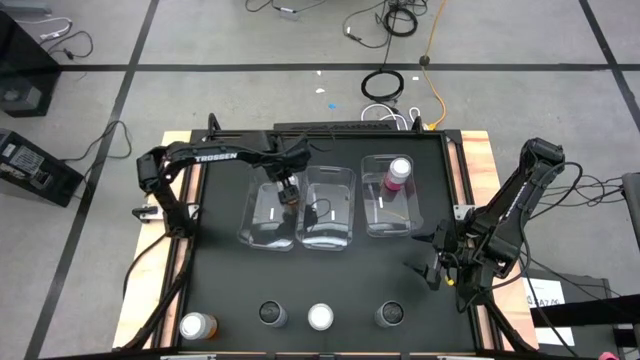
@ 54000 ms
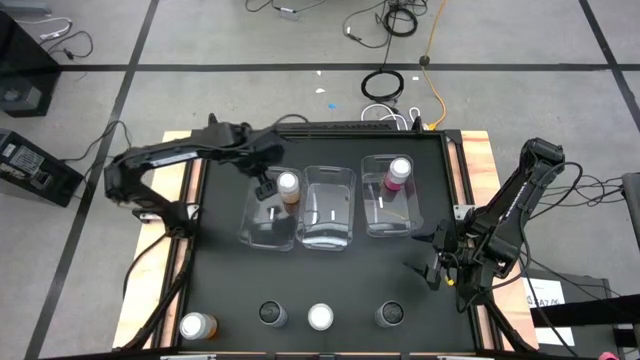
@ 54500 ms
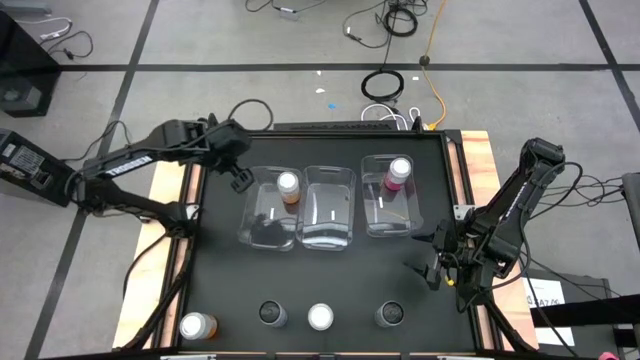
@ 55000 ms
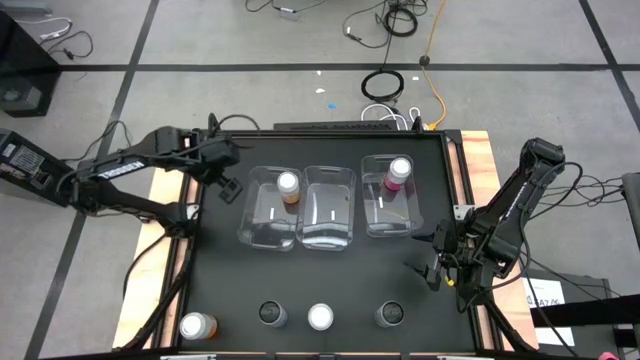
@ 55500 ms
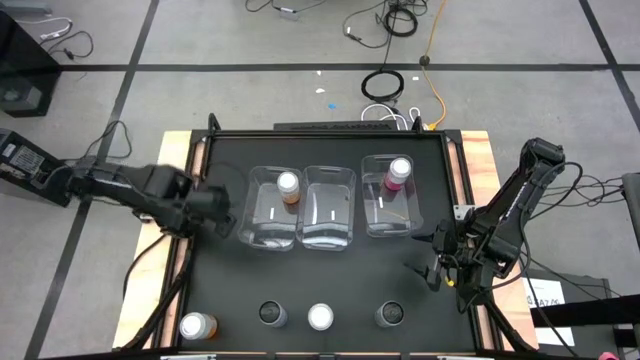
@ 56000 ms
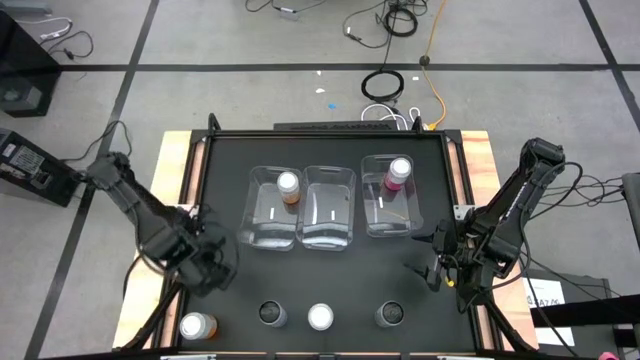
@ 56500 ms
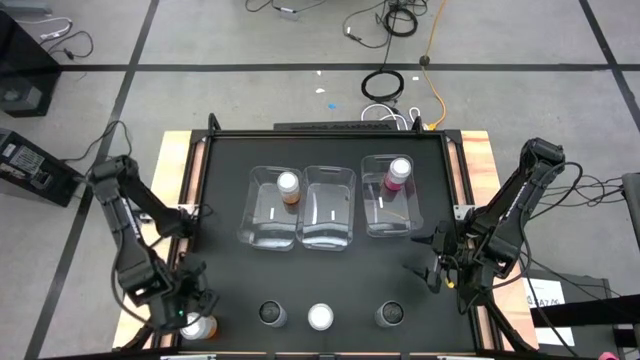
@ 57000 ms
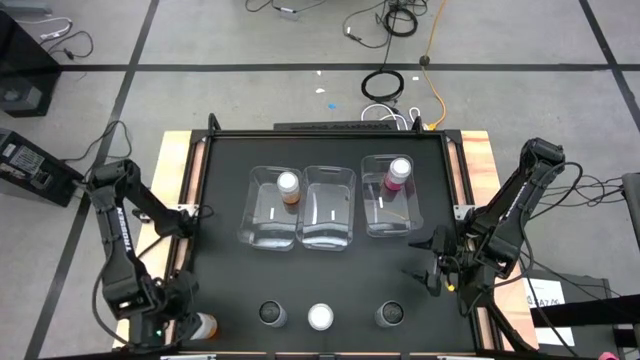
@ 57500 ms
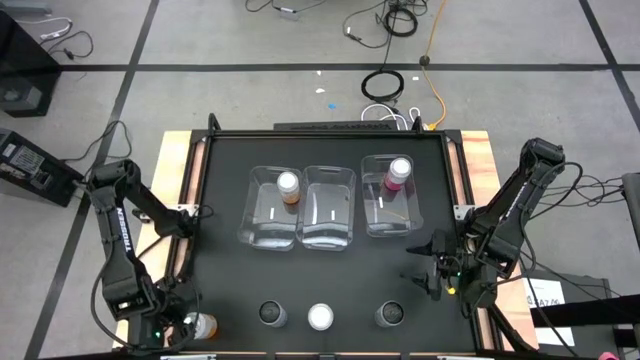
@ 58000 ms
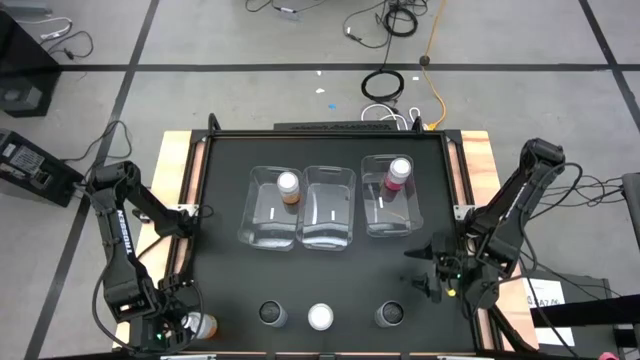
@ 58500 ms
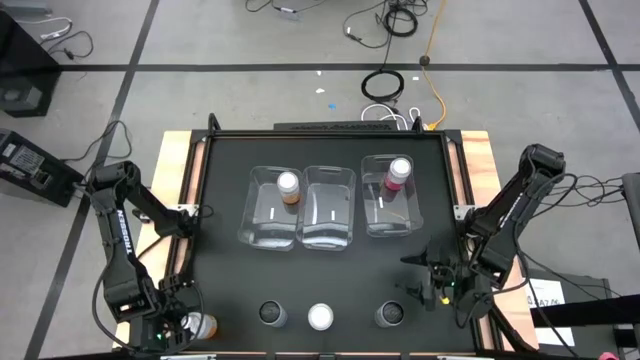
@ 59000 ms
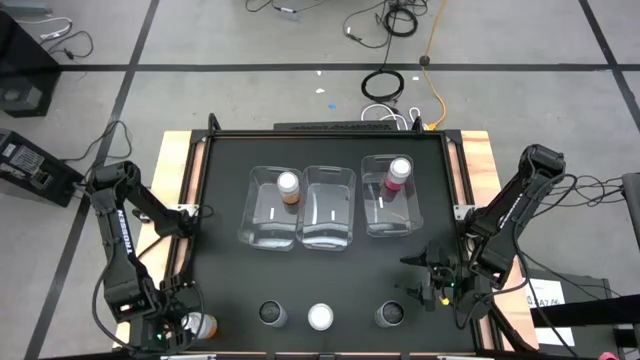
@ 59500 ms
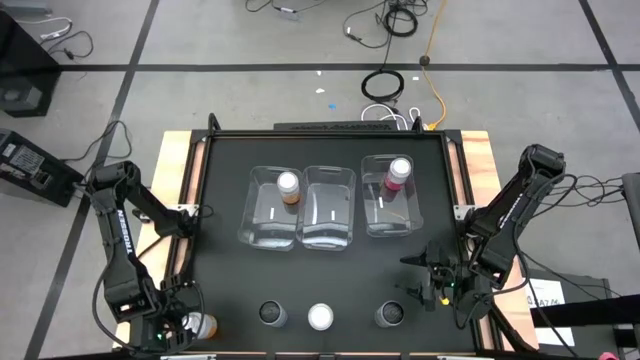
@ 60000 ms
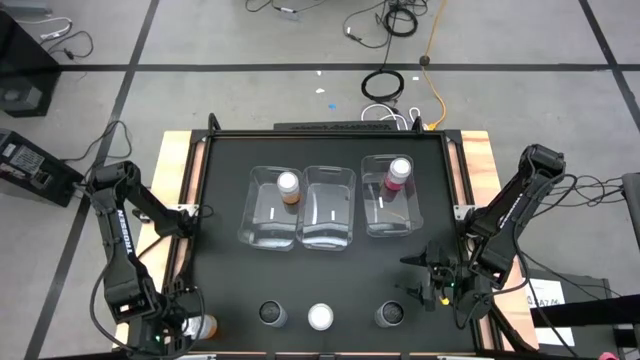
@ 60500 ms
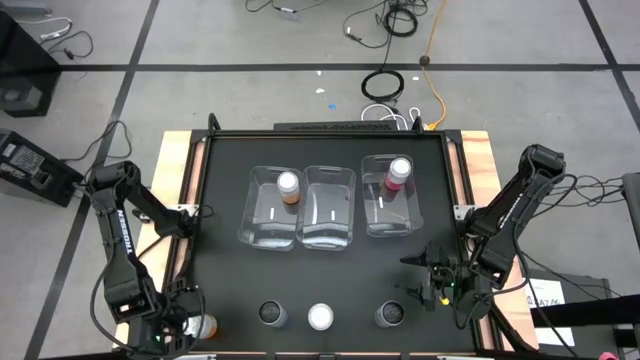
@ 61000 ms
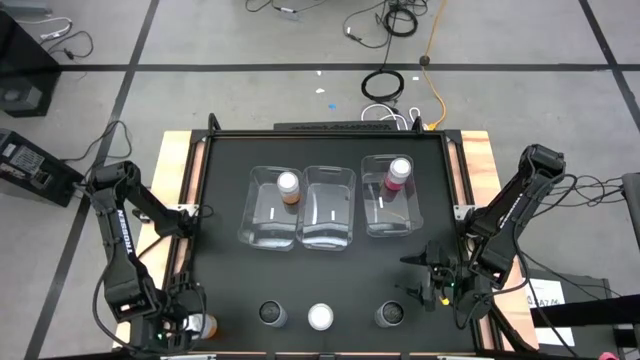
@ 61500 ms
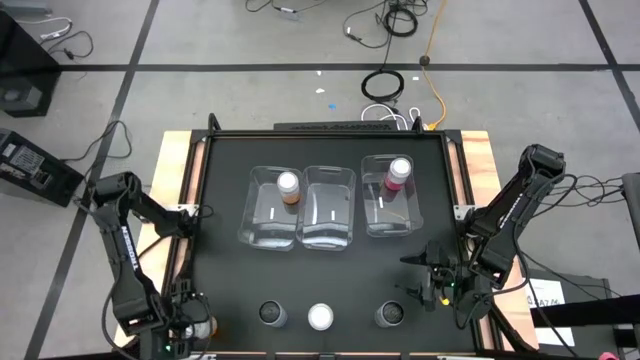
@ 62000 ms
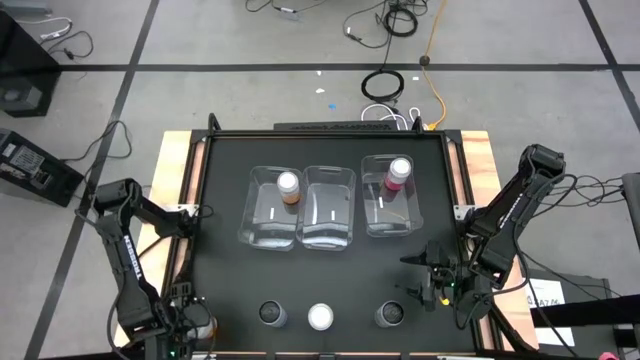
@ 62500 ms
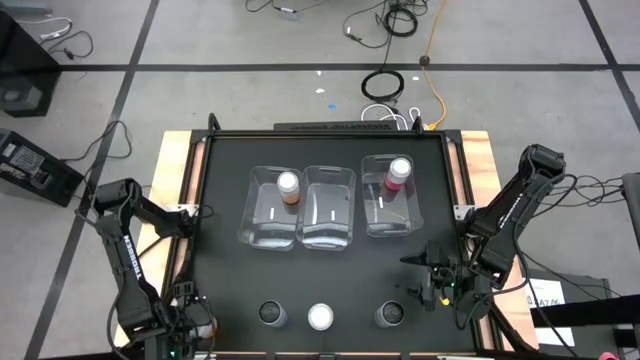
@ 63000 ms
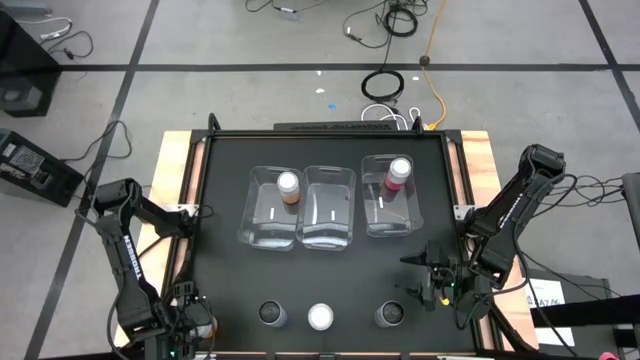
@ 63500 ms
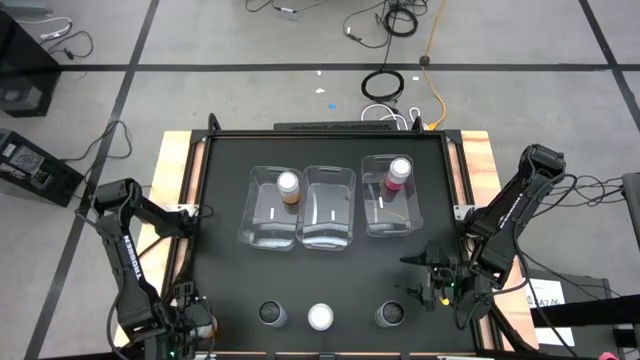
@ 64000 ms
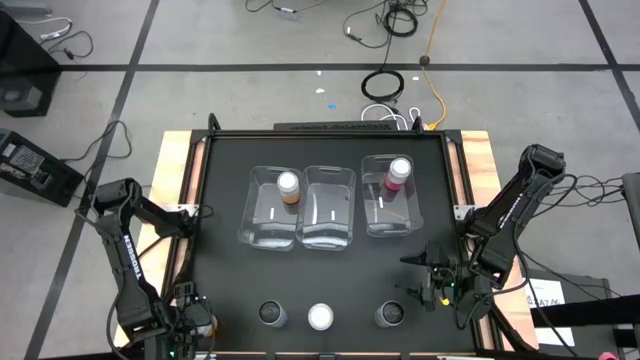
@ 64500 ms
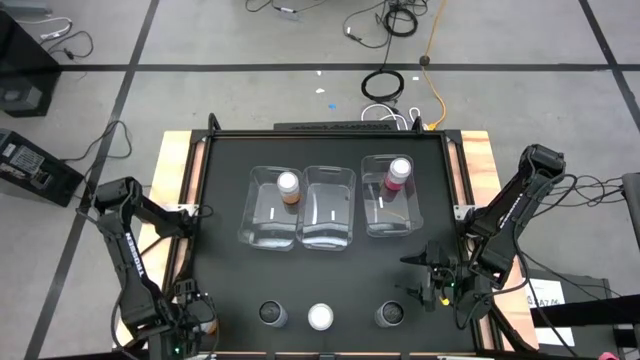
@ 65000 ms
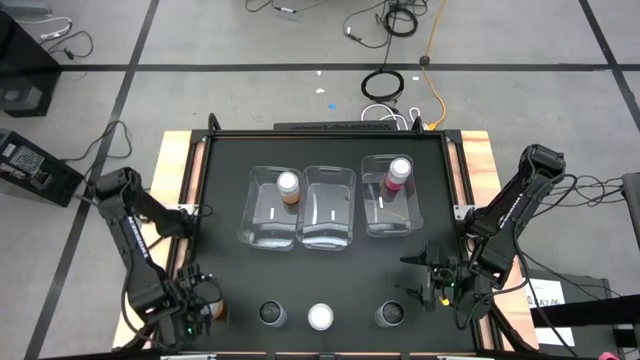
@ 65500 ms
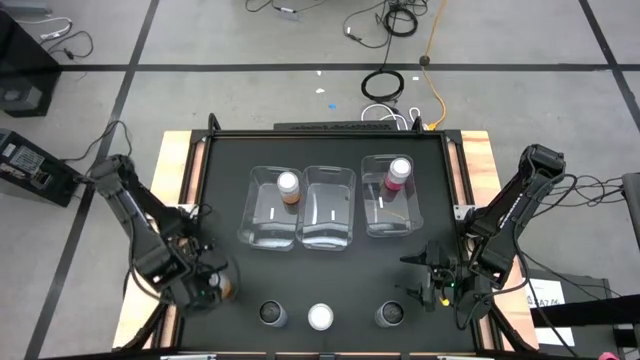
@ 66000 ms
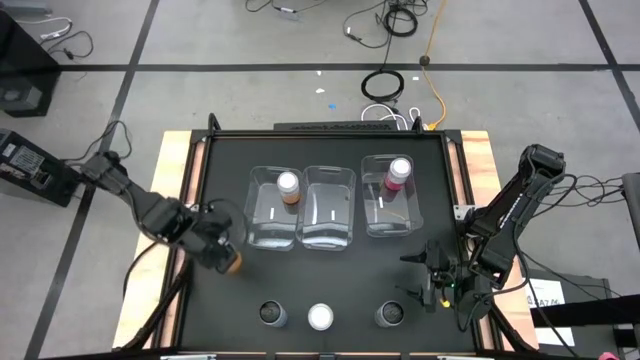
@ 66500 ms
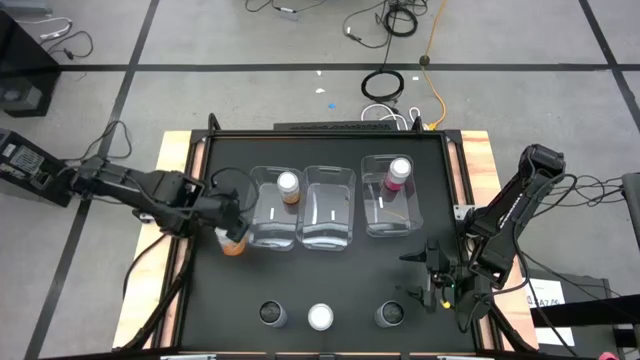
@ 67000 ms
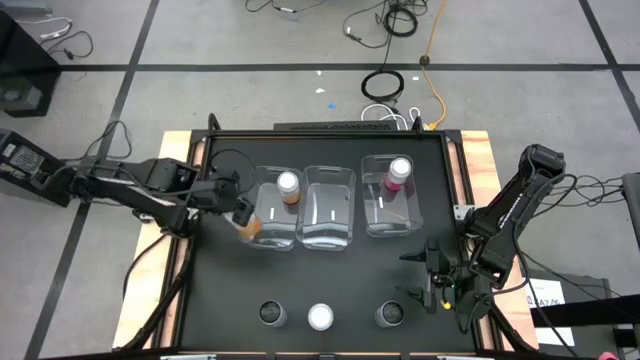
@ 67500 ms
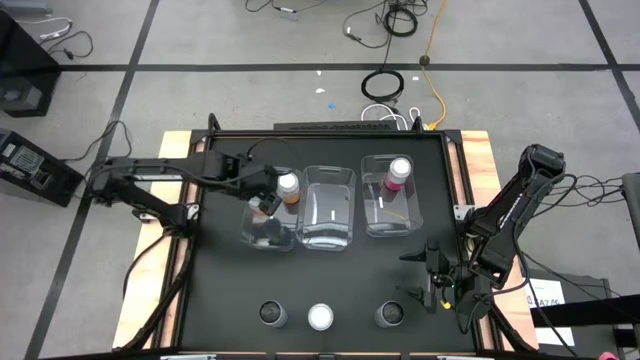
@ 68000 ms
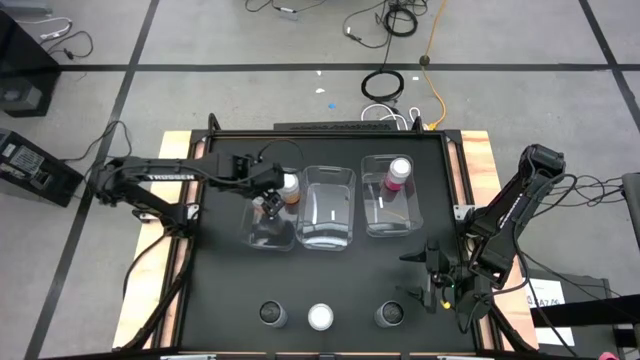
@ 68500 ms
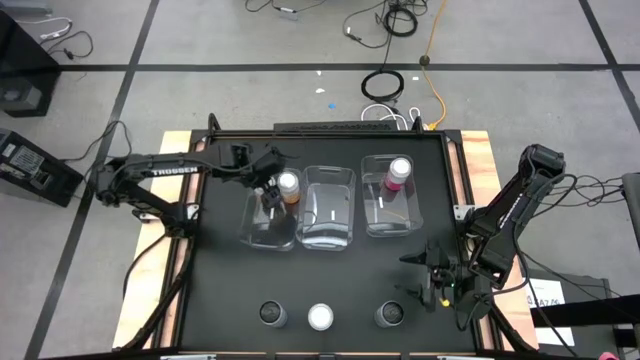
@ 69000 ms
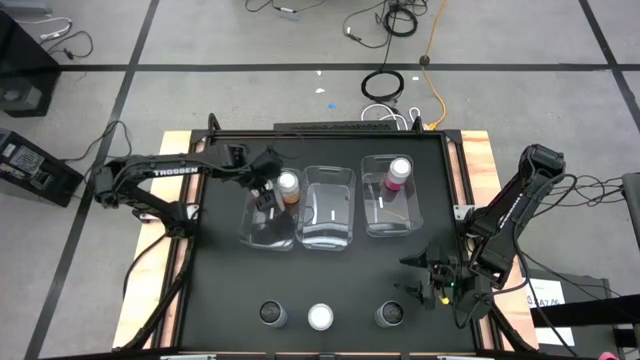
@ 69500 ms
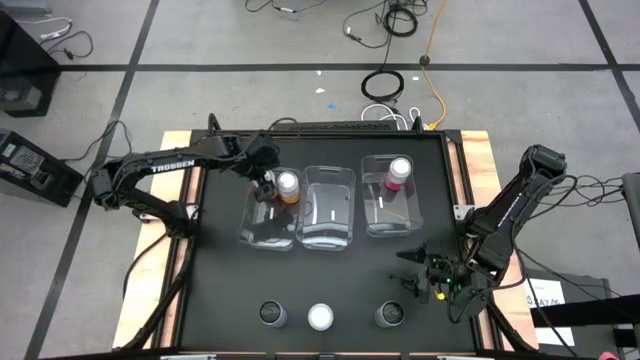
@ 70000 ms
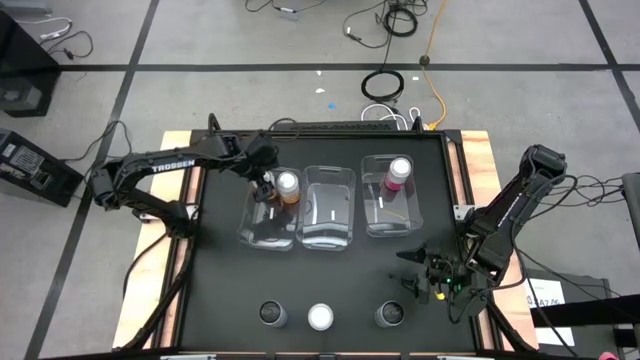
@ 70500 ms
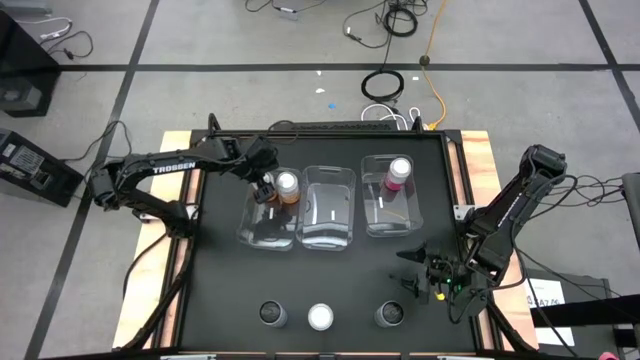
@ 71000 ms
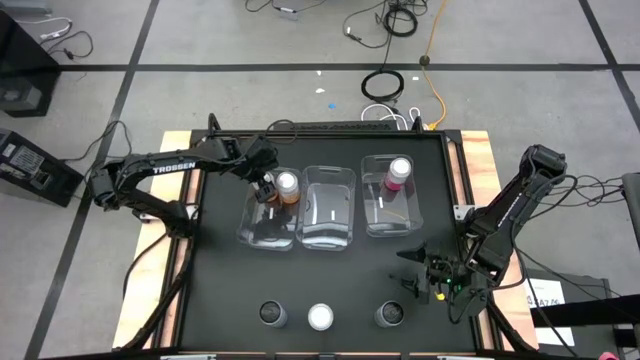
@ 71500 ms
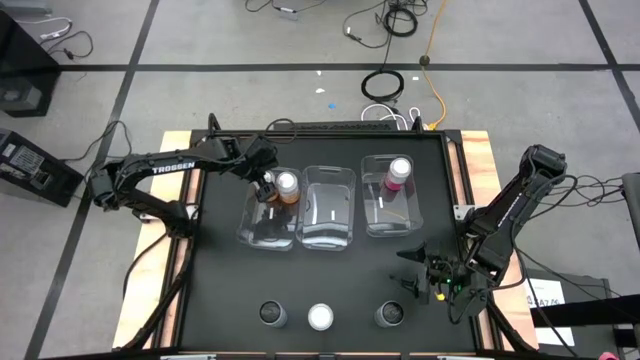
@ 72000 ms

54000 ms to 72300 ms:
Task: Sort soda cans
Put the bottom orange/white soda can into the left transparent bin
